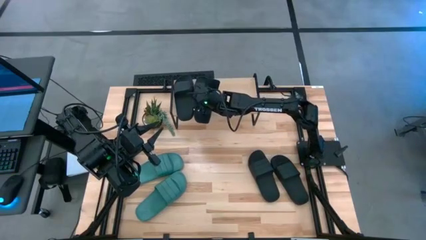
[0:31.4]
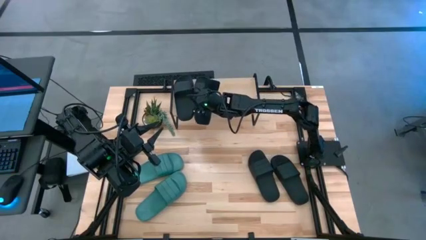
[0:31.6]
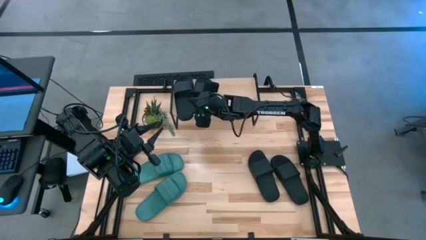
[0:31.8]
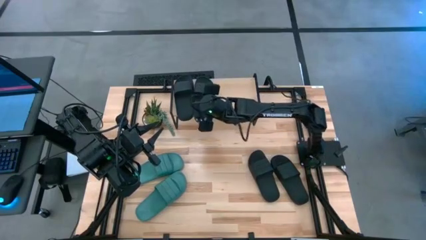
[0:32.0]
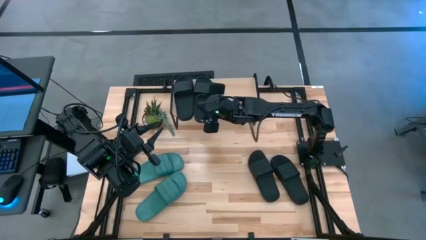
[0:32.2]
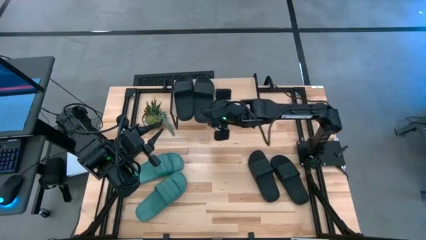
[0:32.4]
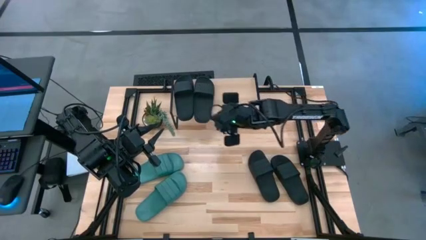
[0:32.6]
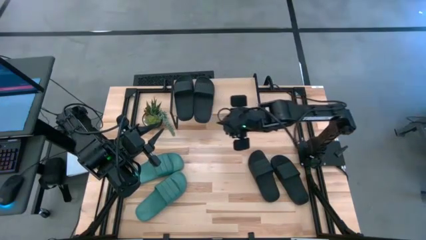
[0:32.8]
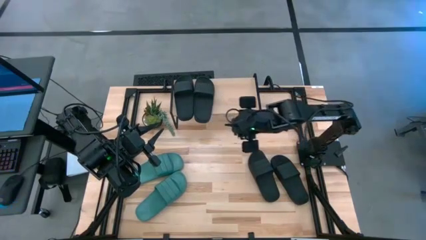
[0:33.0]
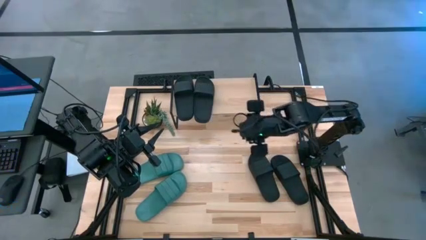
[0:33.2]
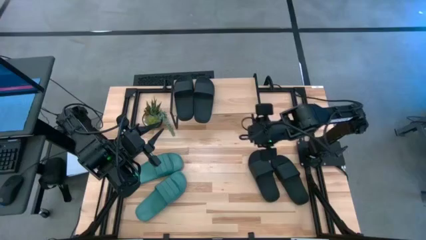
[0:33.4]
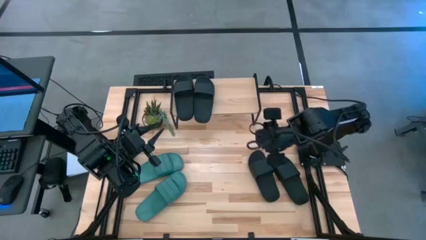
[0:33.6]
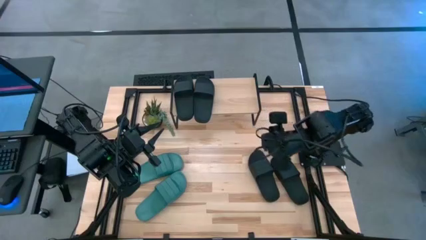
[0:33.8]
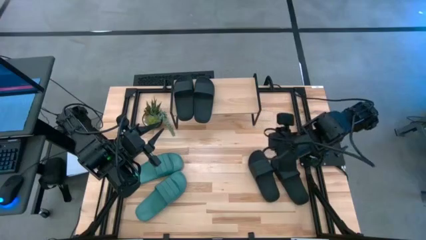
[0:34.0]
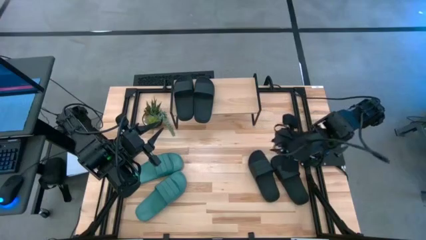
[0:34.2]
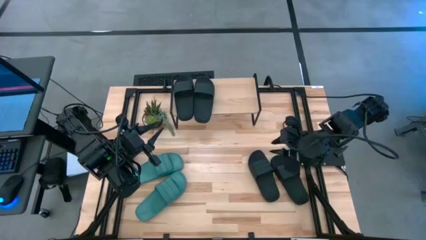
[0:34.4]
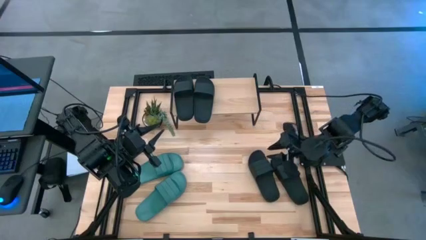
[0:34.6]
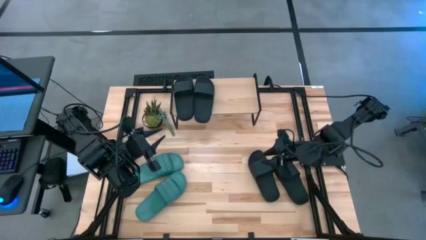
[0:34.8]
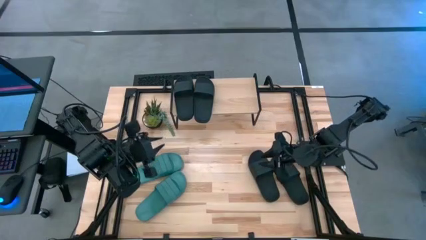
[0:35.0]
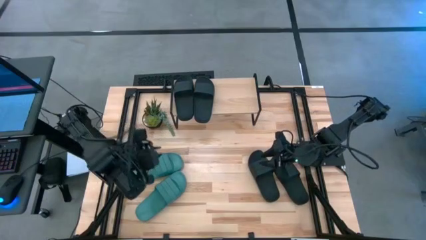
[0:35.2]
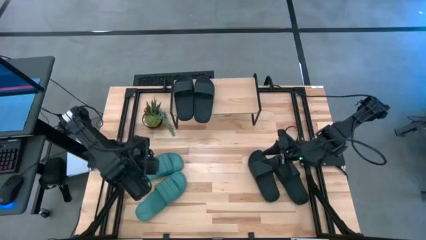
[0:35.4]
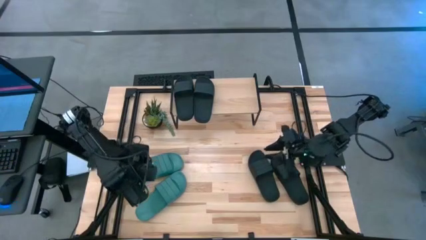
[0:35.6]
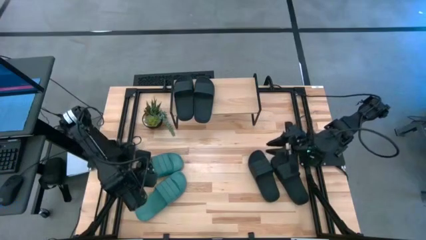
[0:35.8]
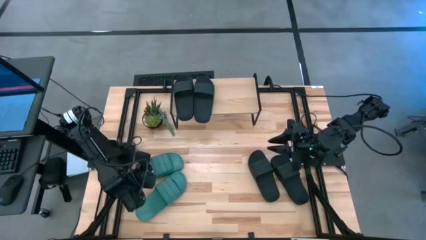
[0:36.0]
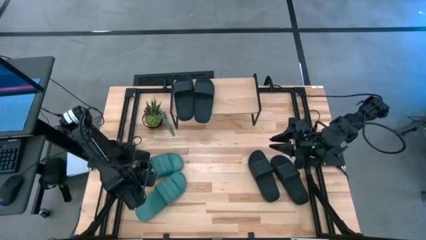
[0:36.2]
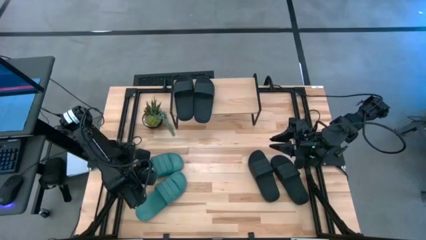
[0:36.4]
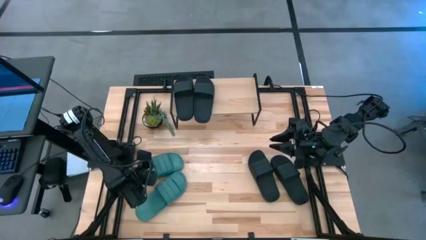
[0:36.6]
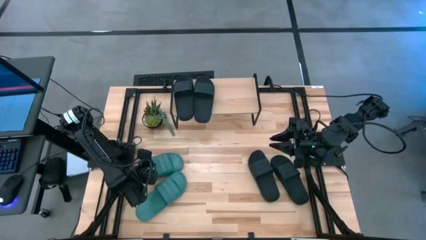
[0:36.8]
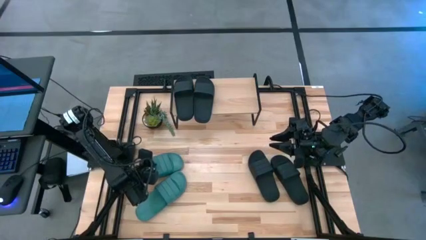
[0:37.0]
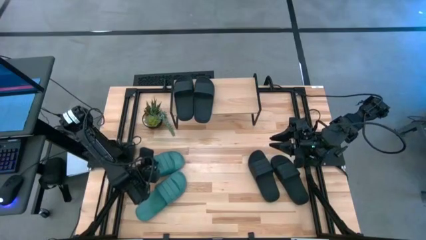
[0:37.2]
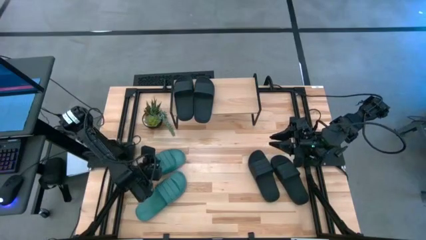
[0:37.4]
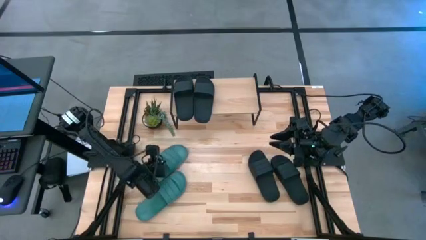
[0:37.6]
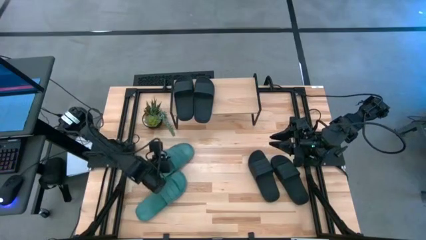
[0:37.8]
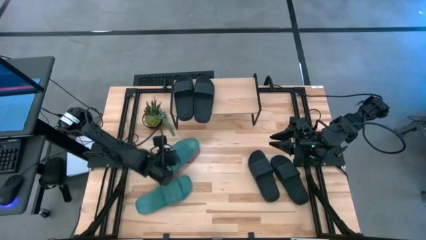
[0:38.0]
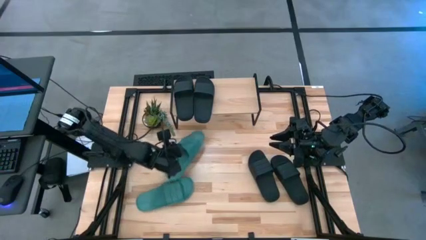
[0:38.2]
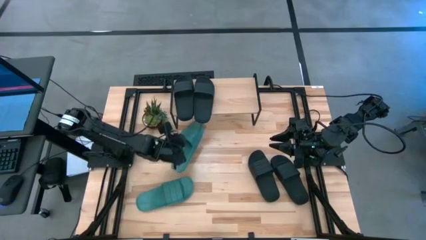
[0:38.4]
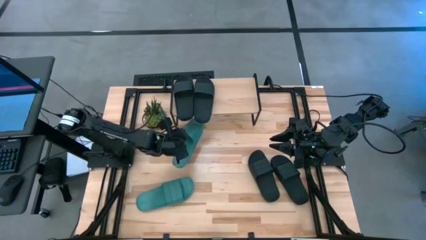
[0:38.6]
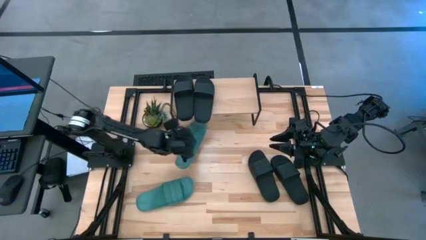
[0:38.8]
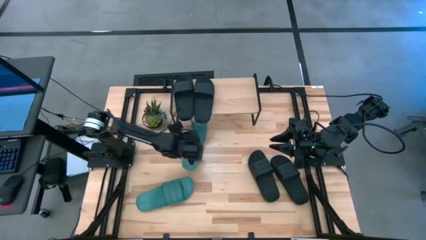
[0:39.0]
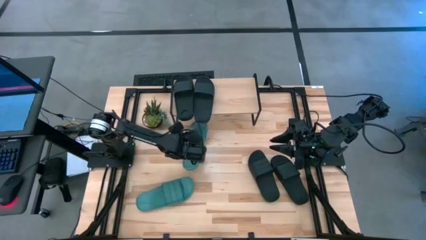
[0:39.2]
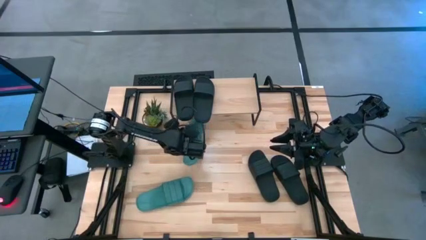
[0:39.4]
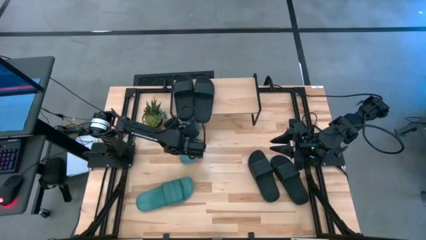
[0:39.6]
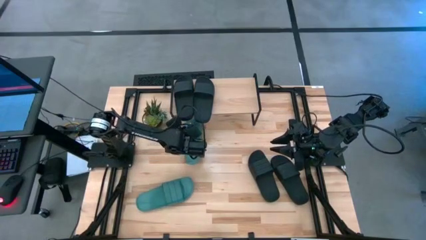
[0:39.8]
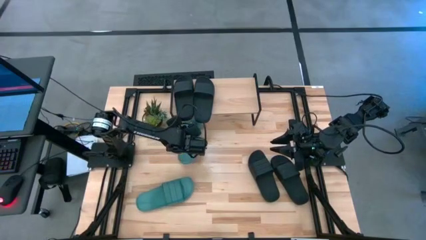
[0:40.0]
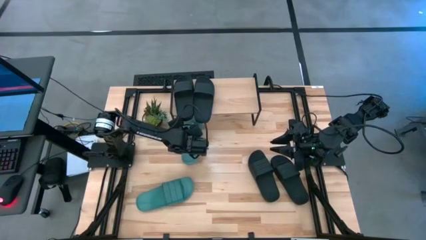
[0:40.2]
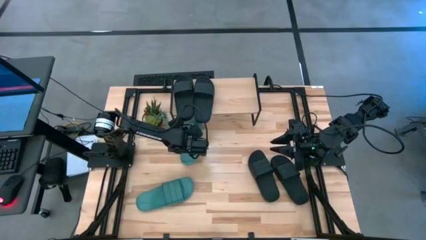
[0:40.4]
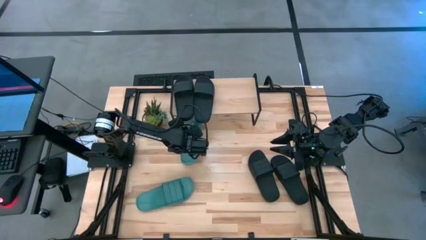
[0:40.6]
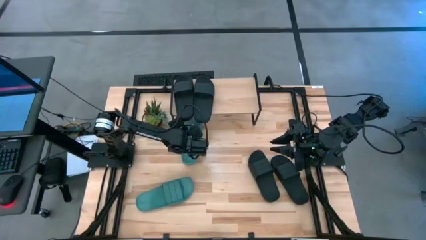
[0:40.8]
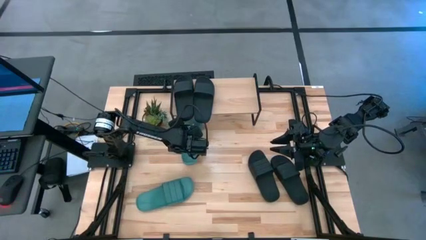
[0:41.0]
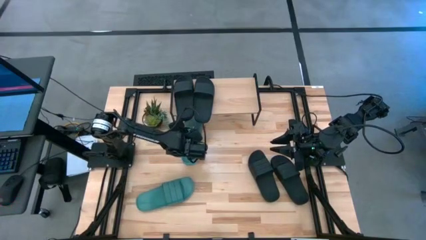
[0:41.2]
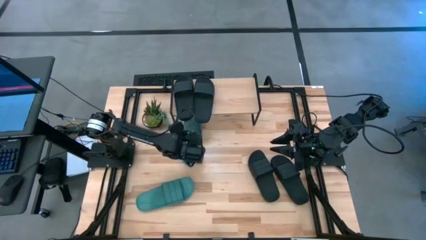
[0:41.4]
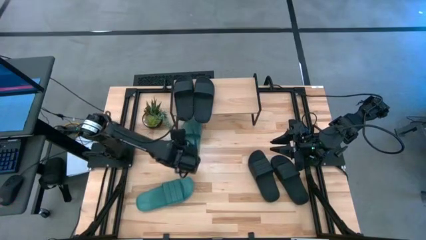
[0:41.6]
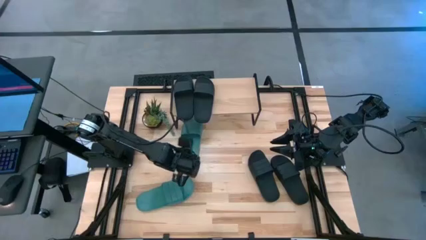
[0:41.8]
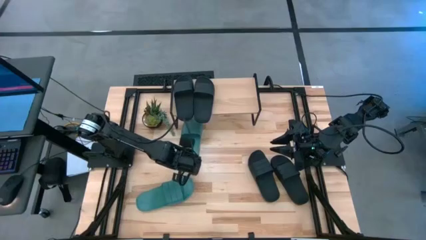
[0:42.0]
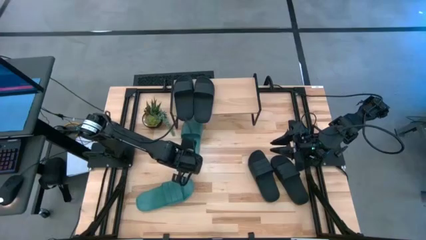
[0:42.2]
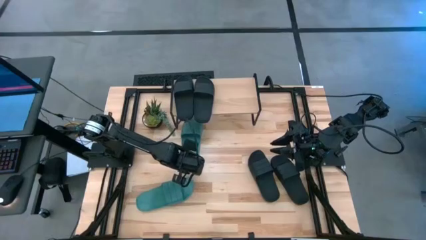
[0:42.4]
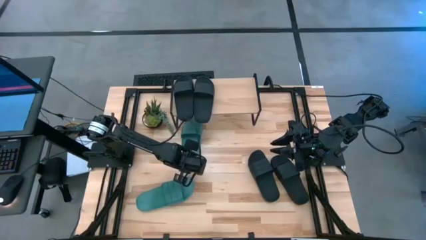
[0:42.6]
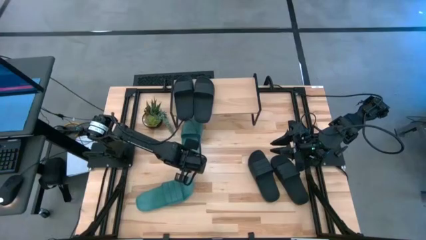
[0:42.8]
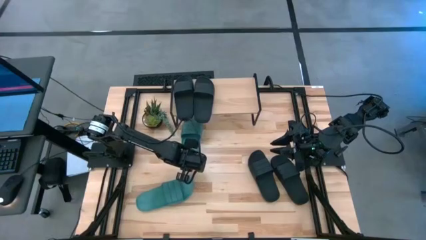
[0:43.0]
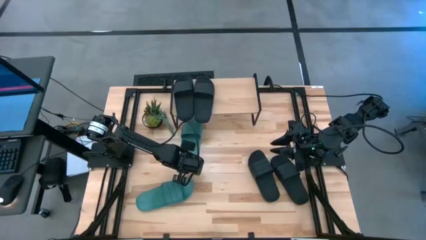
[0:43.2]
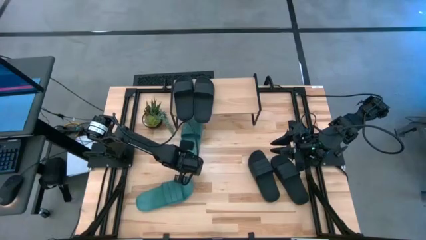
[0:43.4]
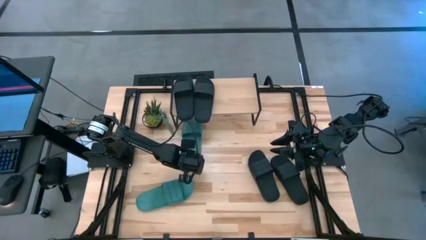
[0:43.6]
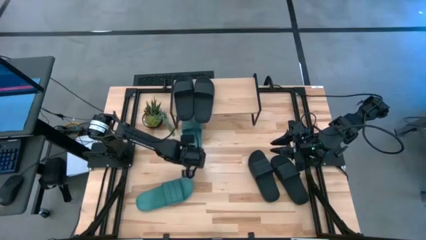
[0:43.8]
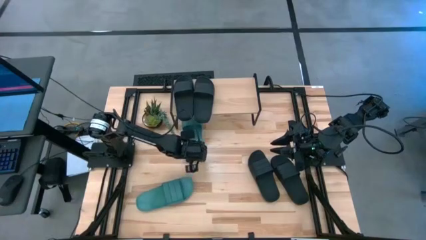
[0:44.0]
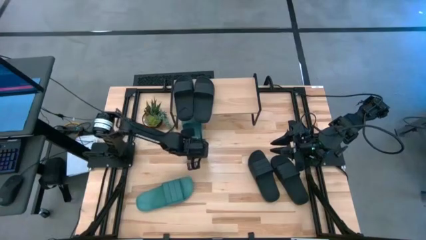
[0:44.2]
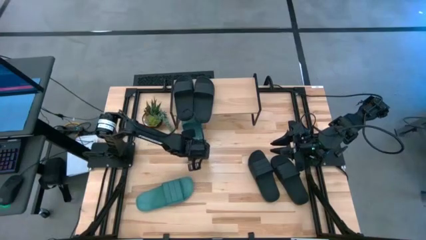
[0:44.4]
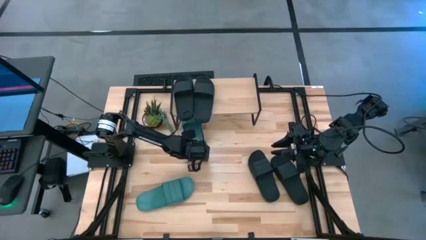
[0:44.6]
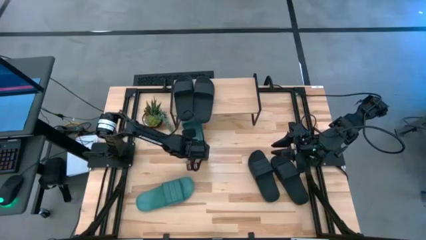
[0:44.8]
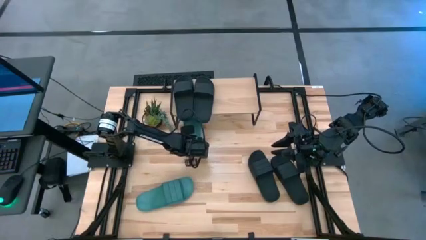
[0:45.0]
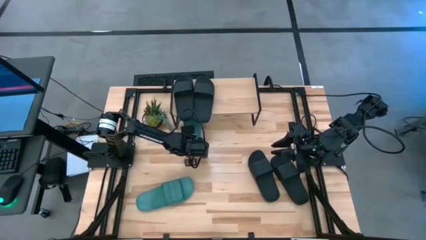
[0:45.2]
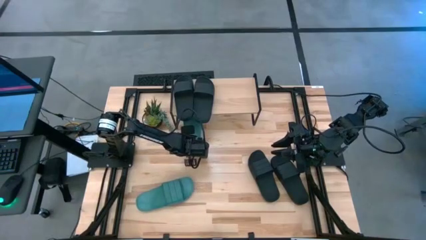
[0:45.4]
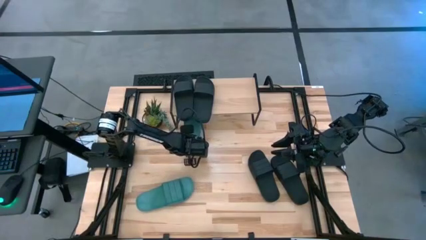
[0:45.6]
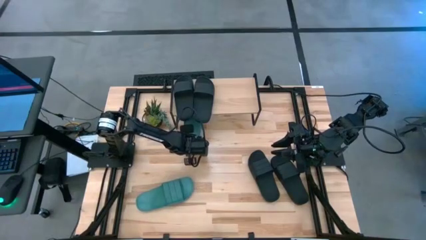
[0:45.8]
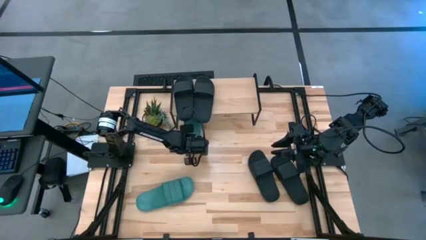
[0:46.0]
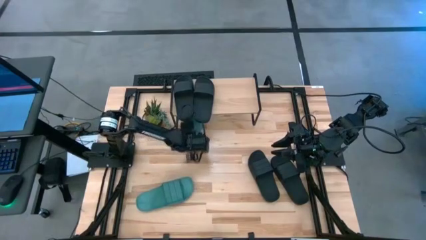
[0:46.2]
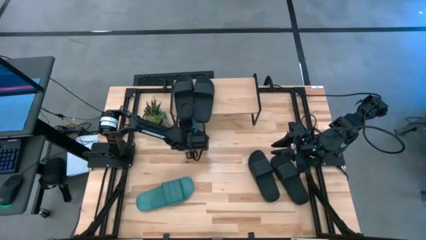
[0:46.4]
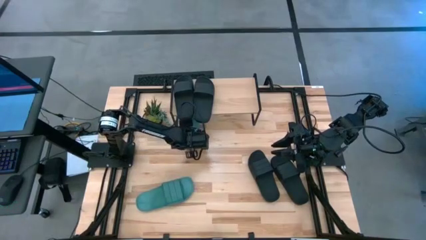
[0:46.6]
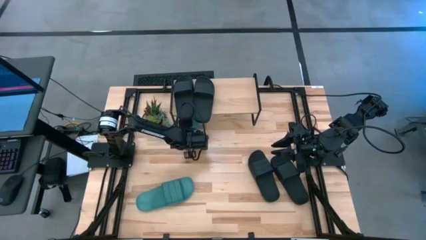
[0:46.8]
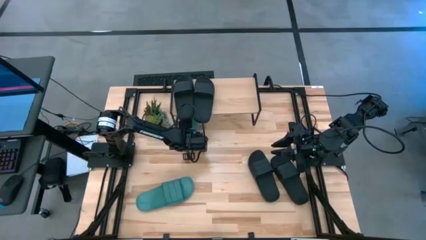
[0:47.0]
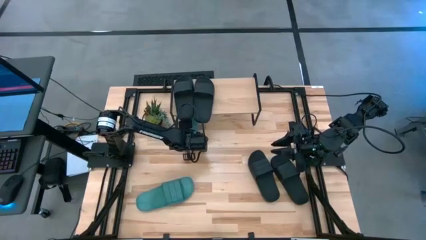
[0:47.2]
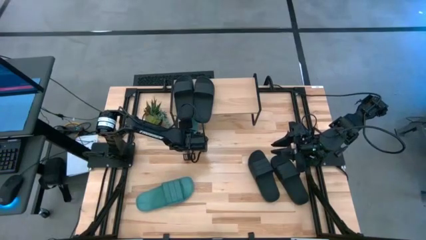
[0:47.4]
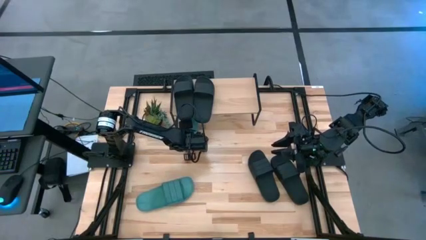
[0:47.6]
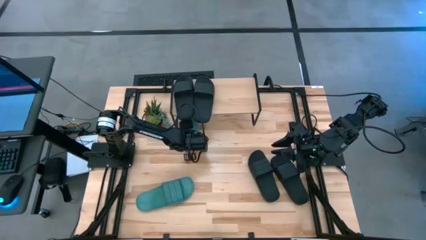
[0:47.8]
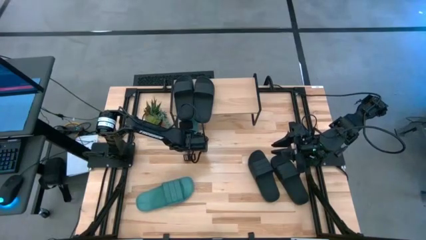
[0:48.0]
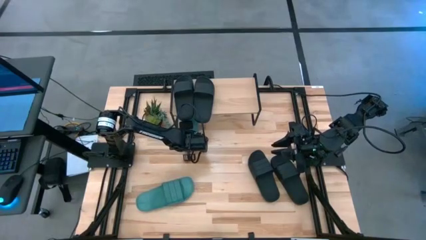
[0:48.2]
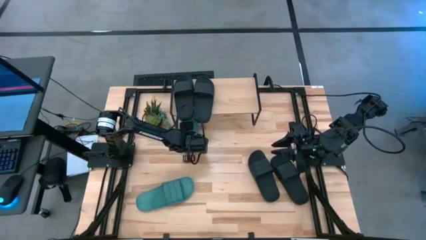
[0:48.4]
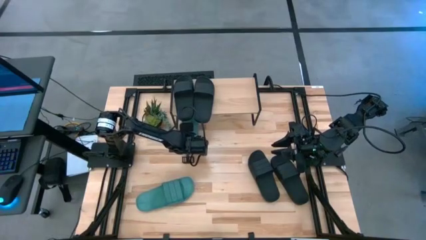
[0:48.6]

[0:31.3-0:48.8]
Task: Pick and place slides into the shelf
Put the blue slide under the shelf
